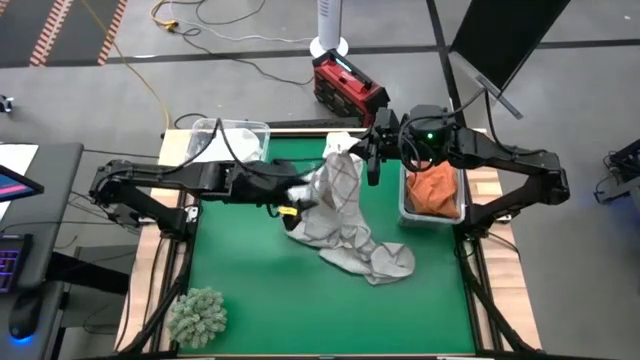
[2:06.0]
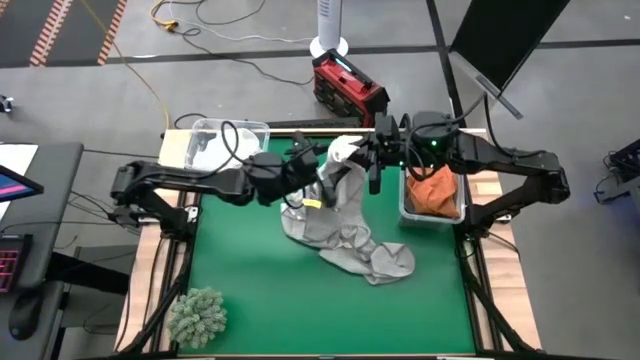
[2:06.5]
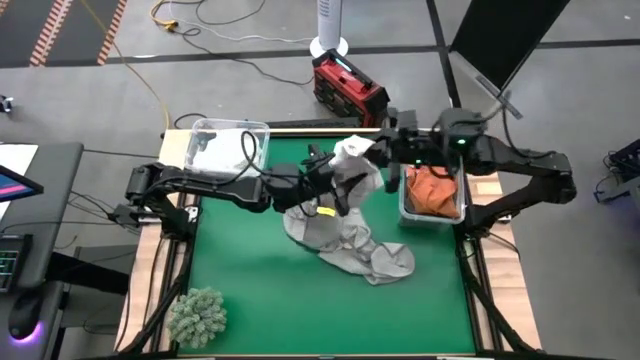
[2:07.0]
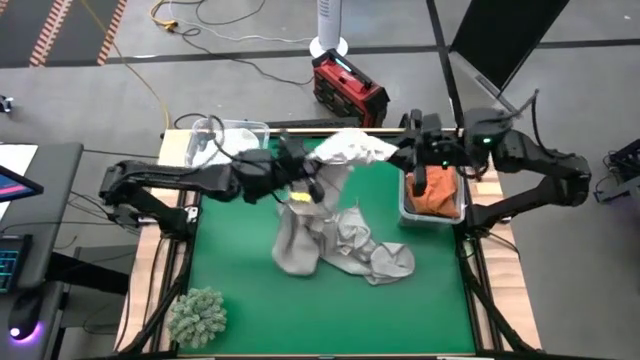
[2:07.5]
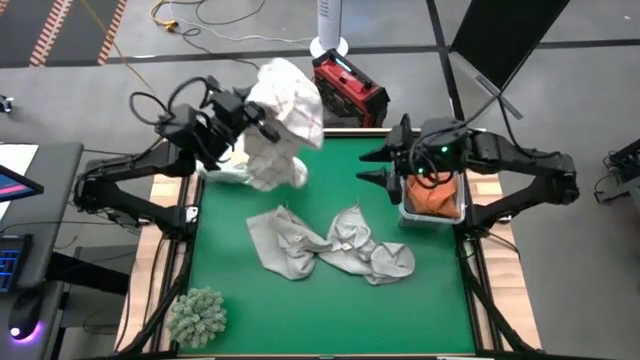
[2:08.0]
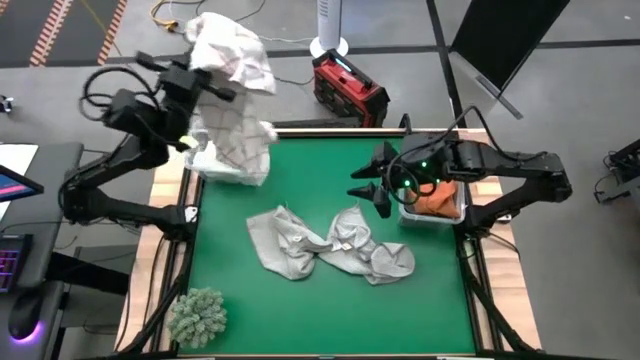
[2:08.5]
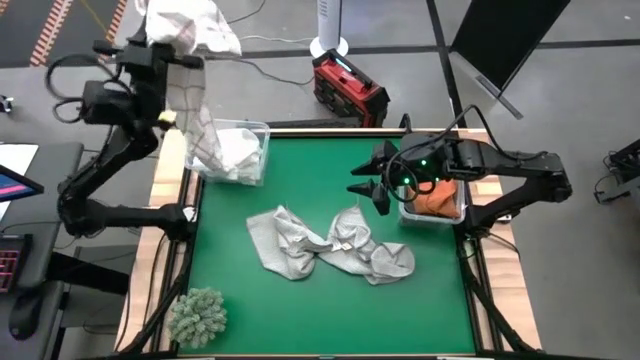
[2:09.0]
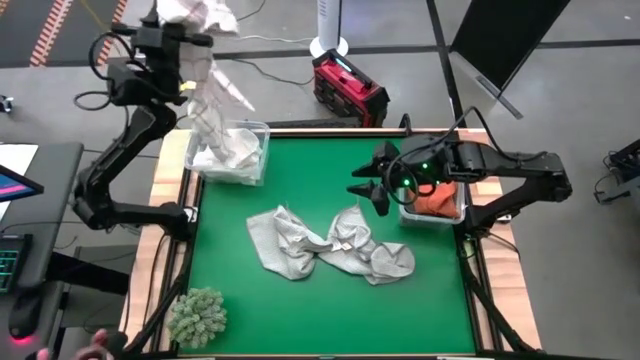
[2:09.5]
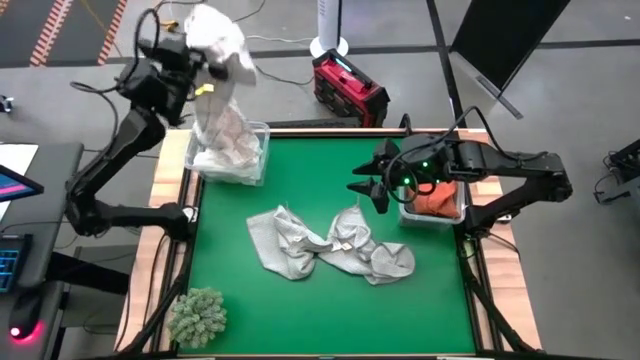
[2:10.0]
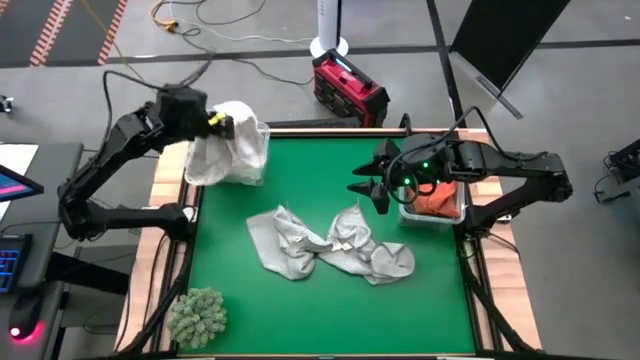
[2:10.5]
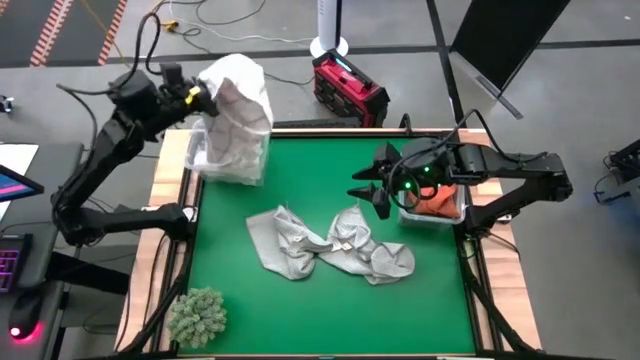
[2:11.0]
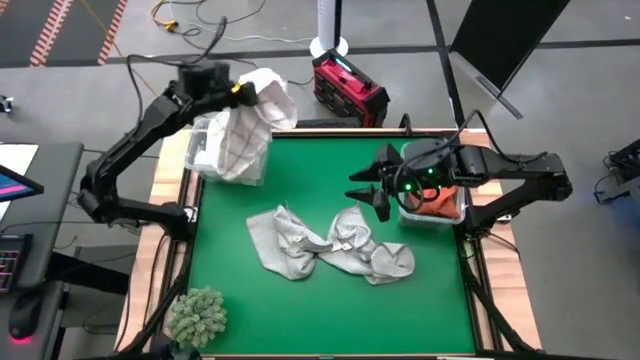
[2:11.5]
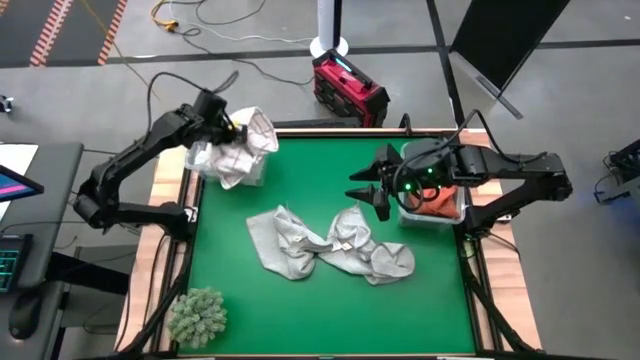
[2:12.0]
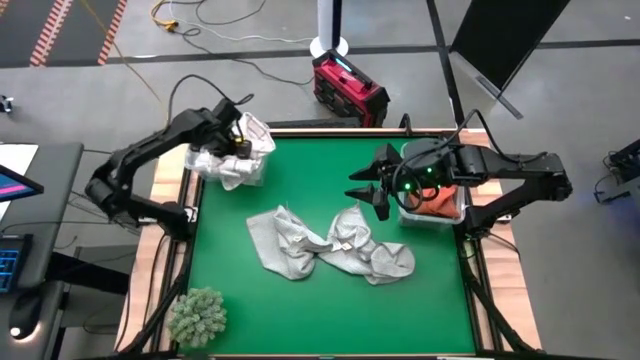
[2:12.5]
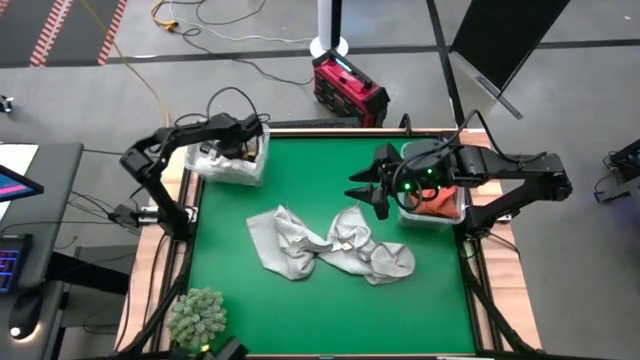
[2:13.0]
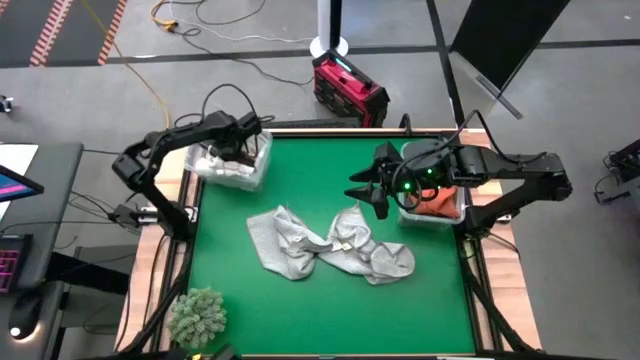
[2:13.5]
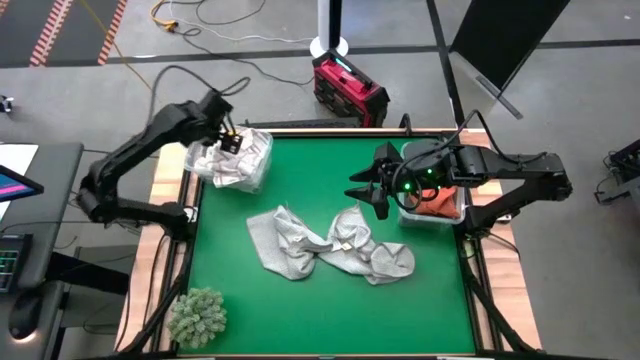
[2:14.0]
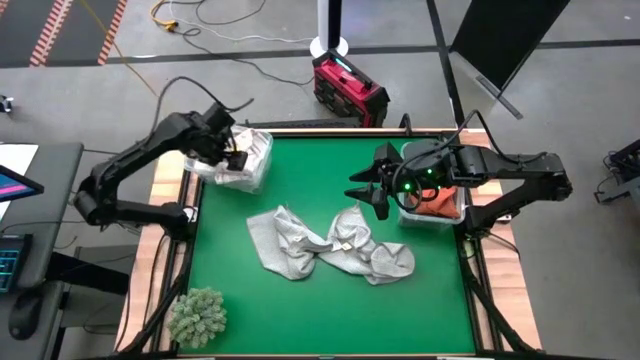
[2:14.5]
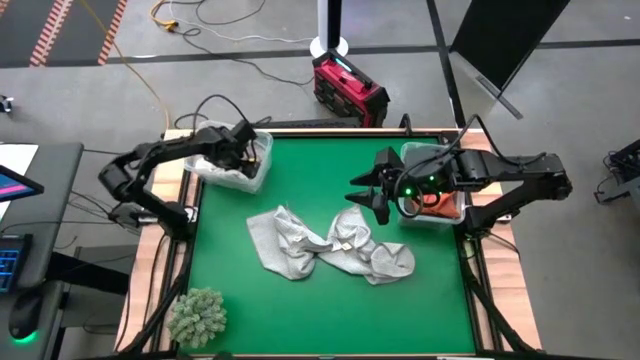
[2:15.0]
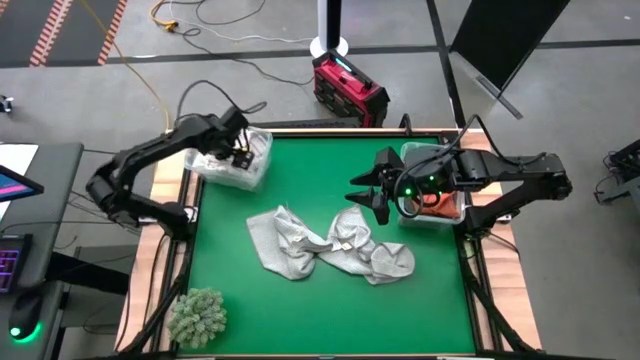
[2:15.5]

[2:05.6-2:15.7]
Task: Sort towels by color in basket
Put the white patterned towel into the left transparent bin

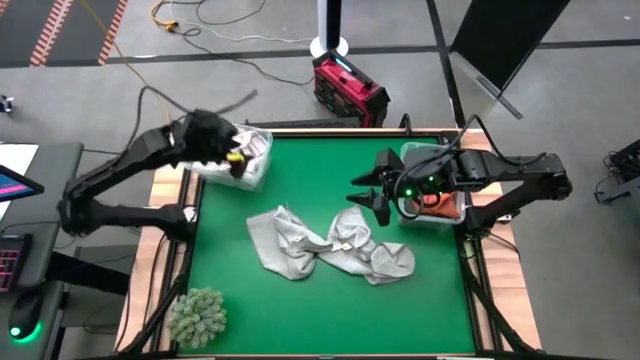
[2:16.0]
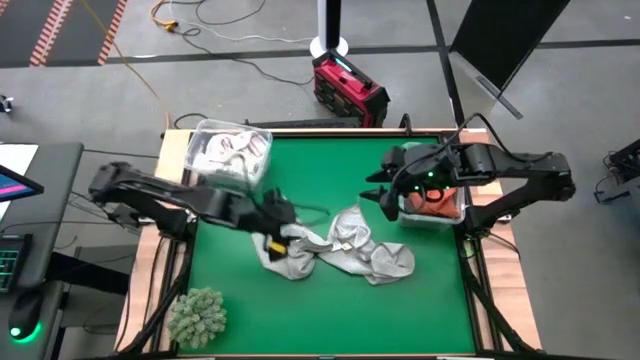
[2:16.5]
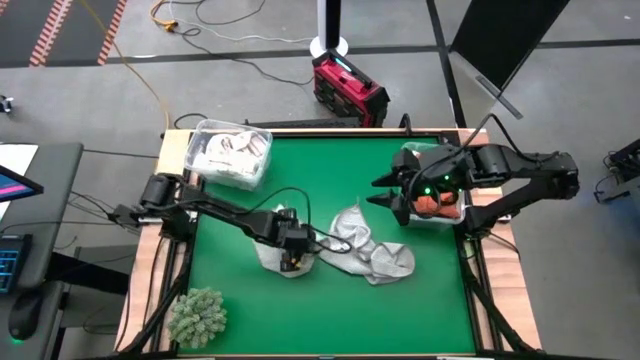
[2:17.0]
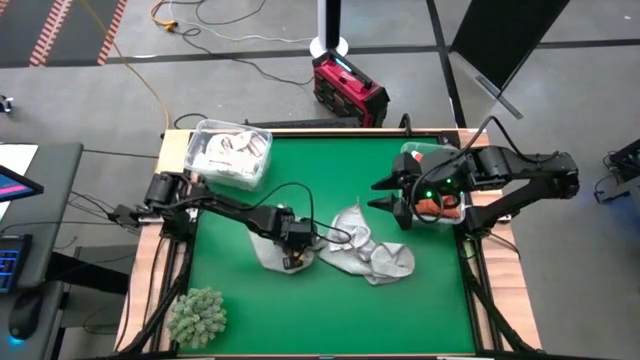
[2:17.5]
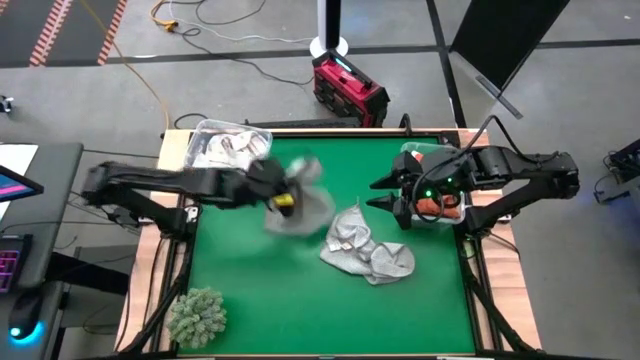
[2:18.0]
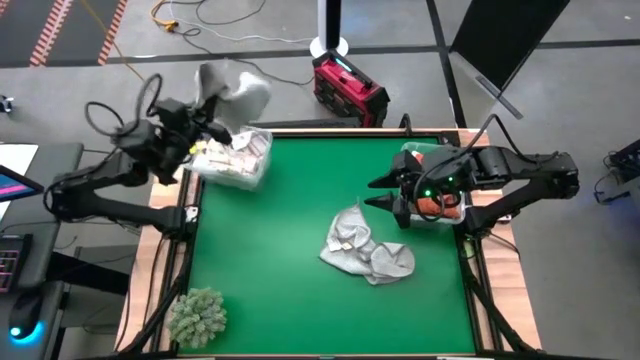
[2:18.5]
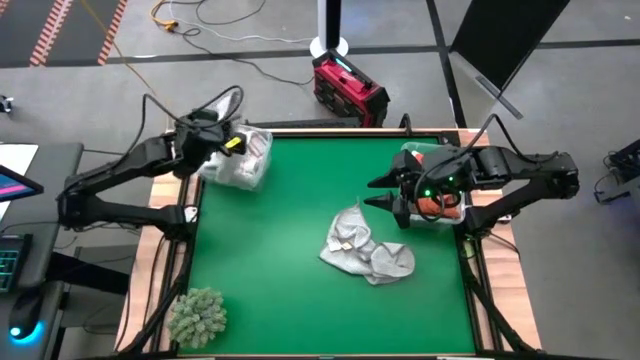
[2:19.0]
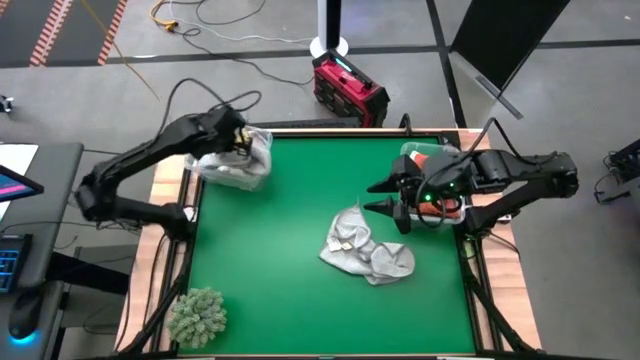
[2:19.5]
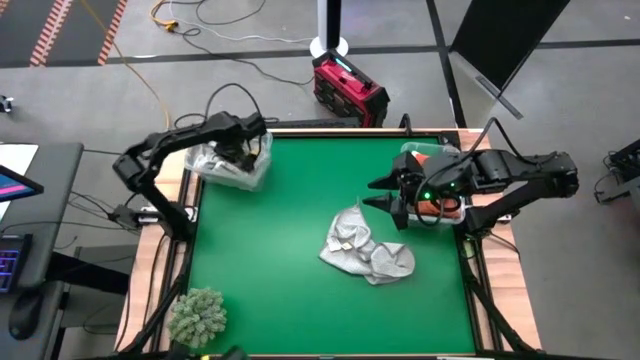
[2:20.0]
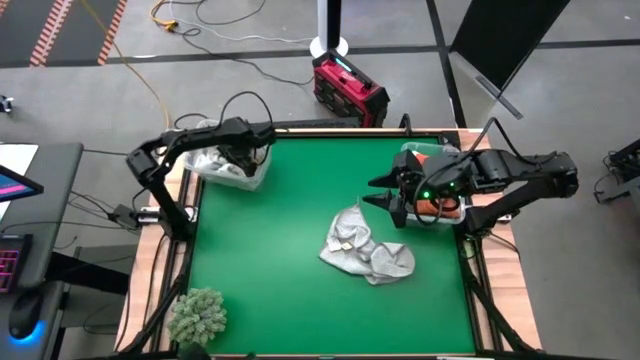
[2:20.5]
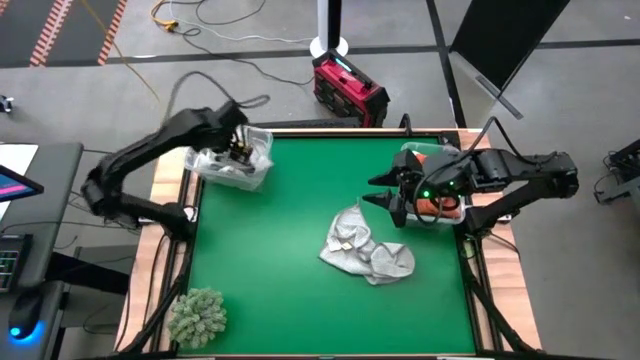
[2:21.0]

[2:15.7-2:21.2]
Put the light gray towel into the left transparent bin
